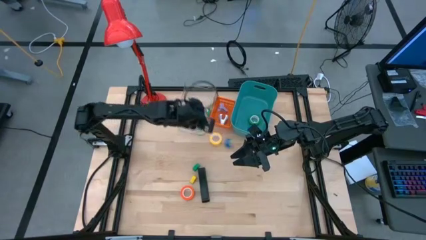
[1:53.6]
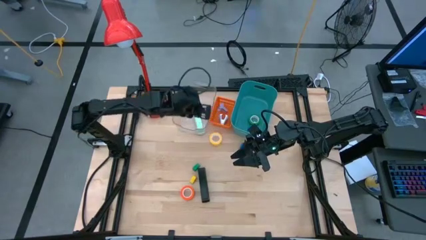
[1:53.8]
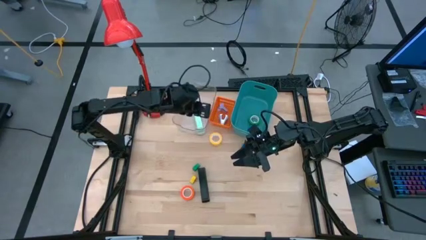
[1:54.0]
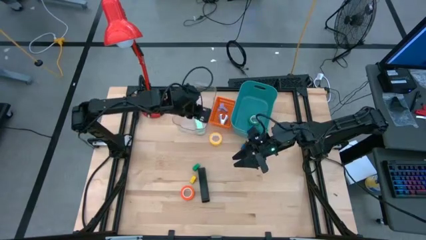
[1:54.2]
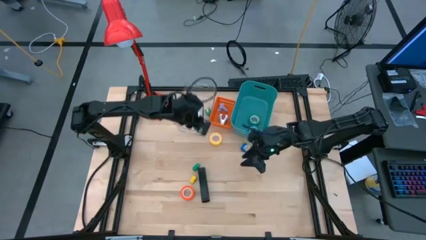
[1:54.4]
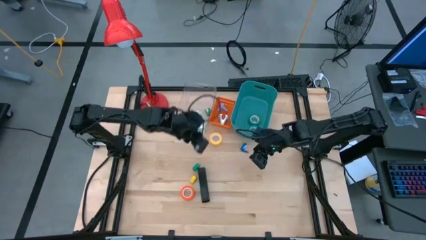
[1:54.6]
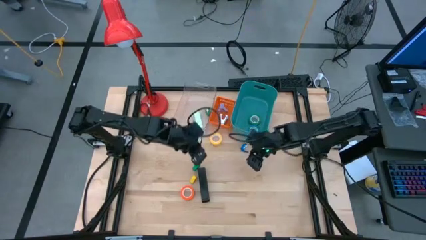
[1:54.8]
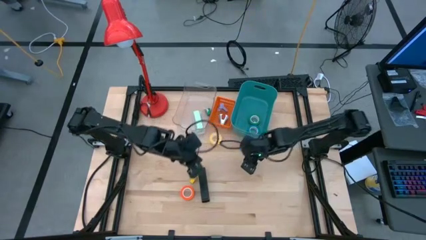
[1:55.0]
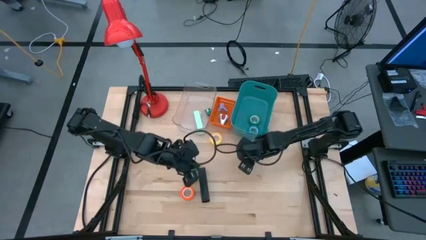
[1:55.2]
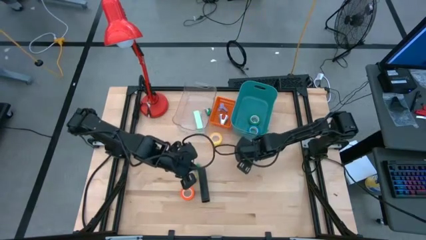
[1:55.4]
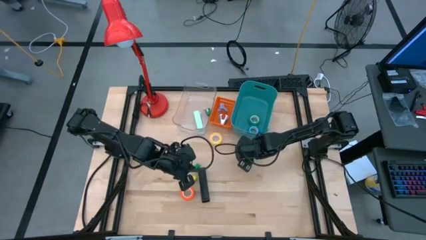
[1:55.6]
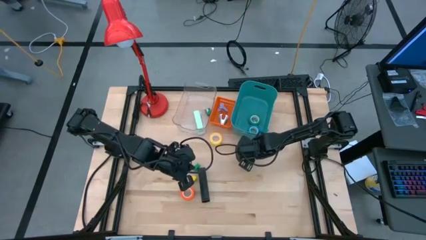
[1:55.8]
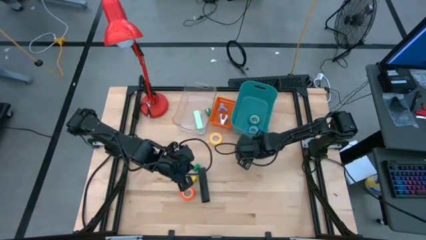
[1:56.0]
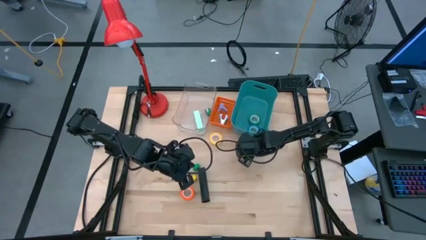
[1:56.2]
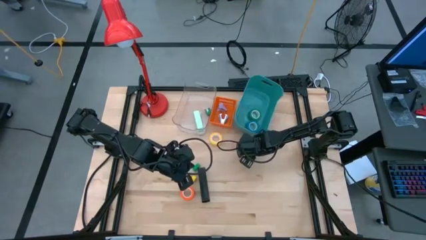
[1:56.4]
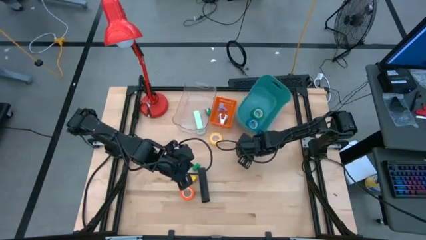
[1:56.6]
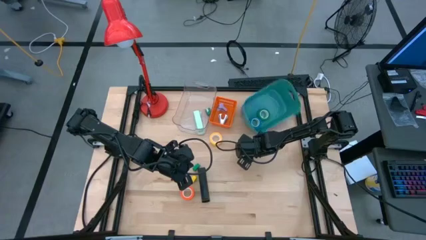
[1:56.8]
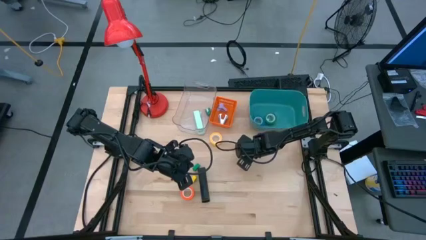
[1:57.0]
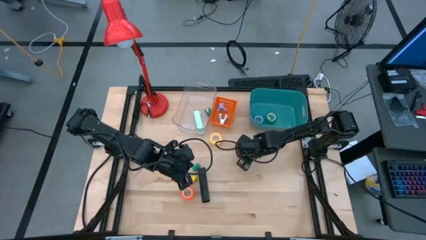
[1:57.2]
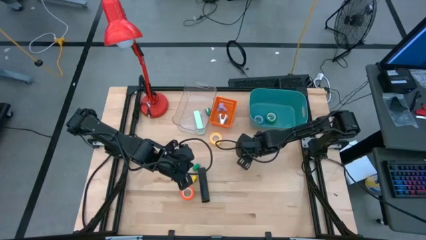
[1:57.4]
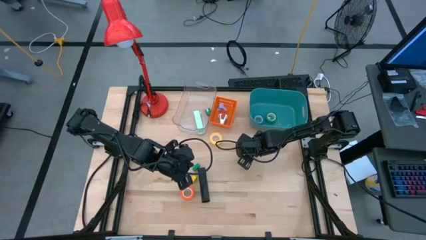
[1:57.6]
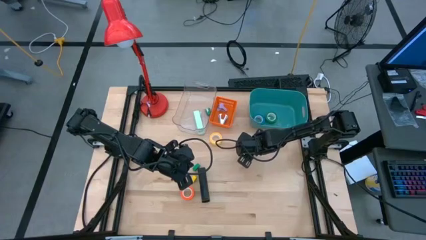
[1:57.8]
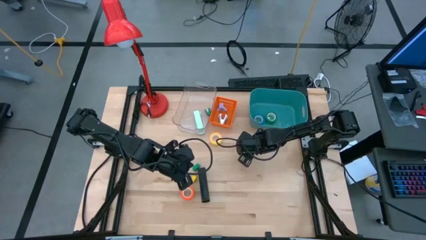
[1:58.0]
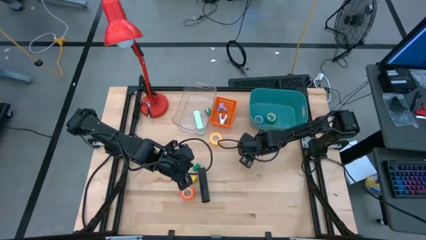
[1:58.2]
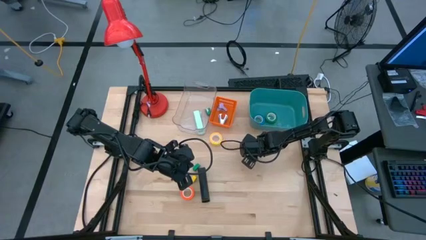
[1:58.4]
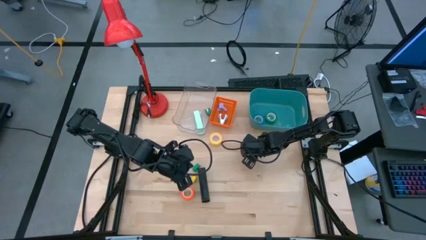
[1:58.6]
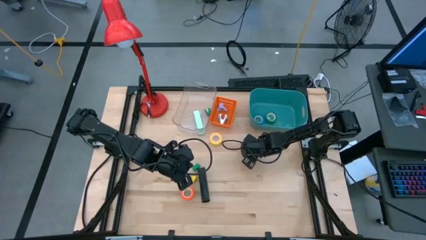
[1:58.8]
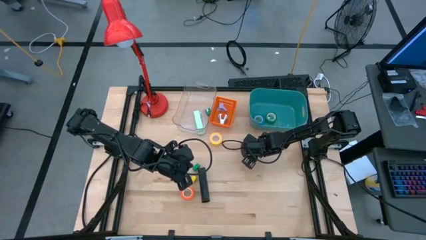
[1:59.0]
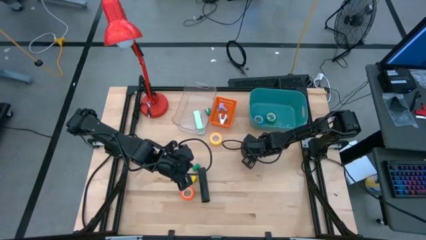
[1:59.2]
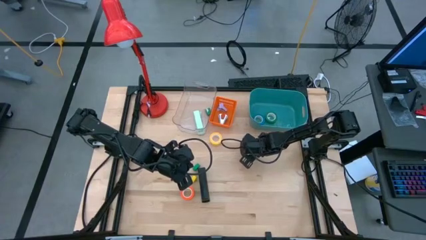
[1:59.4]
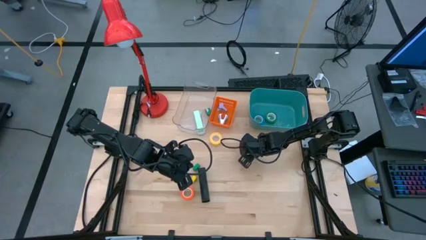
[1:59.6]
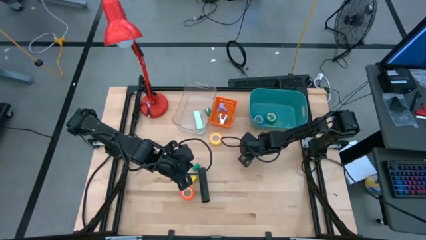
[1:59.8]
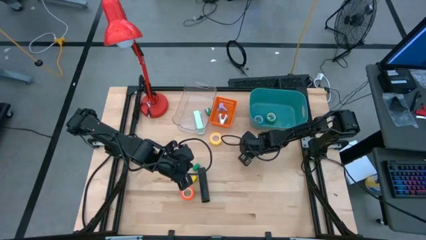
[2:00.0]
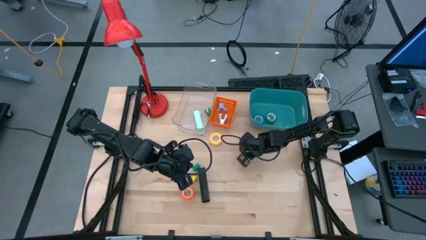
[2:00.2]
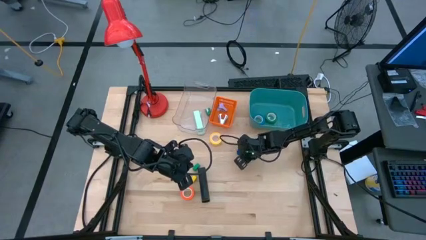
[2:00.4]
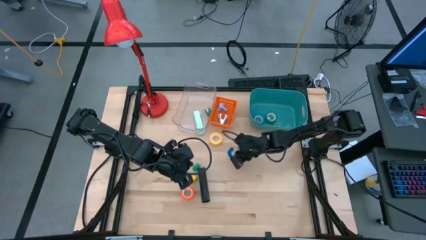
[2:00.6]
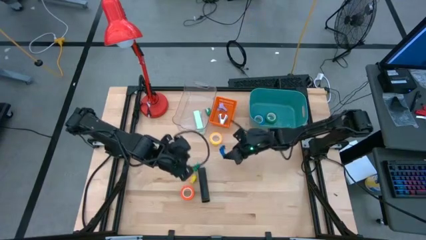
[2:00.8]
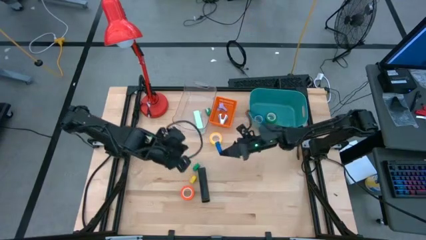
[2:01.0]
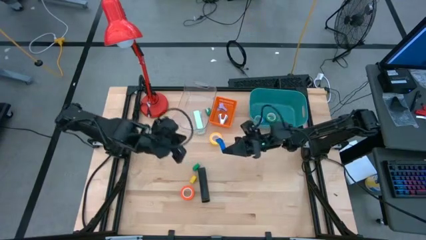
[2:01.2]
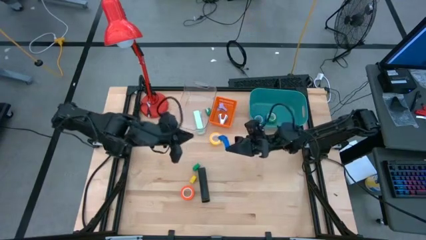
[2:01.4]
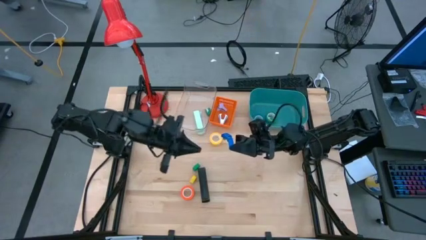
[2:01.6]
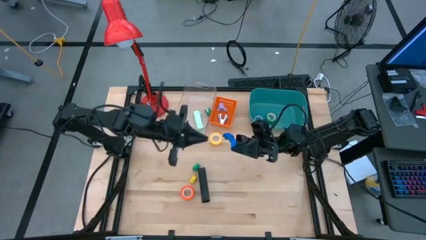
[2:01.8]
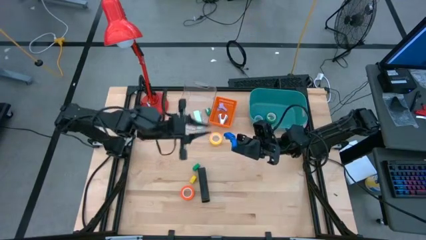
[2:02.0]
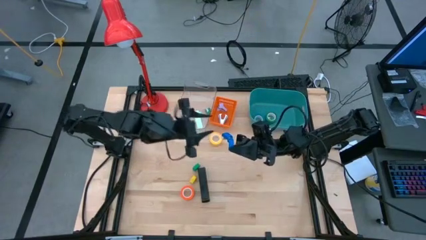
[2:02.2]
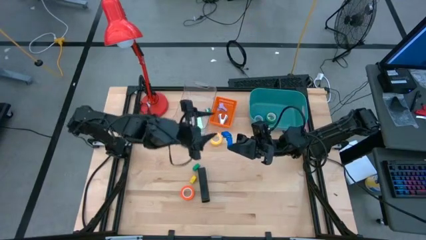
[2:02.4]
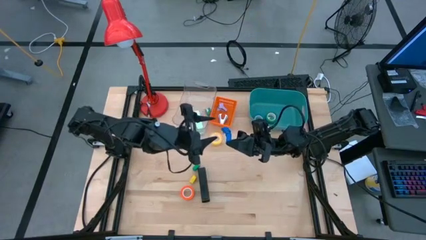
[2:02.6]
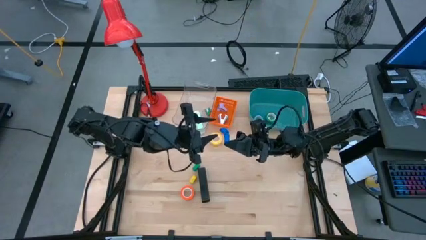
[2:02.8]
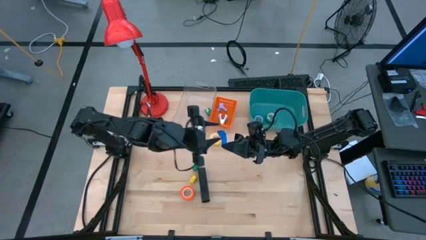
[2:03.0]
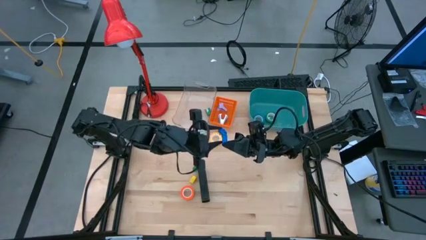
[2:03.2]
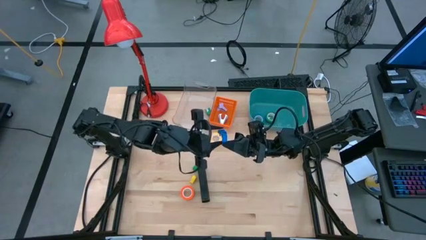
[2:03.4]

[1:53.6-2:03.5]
Task: Pick and place Stapler, Stapler remover, tape
Put the blue stapler into the transparent bin
